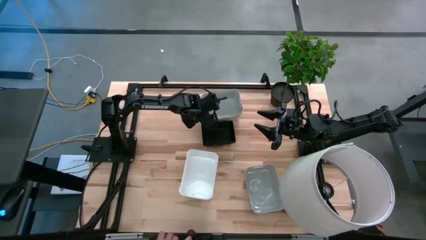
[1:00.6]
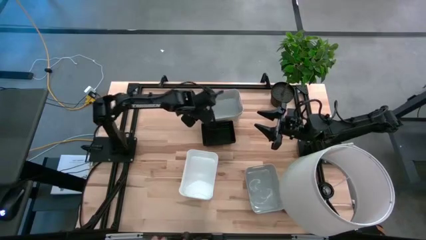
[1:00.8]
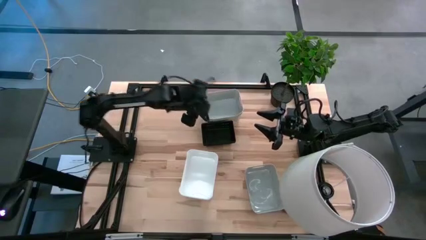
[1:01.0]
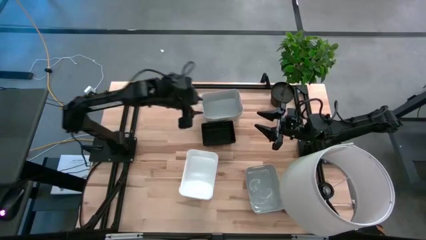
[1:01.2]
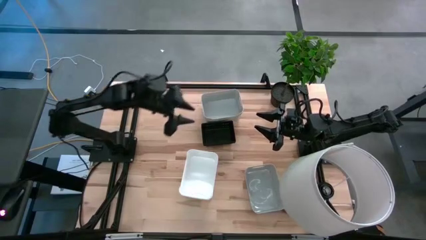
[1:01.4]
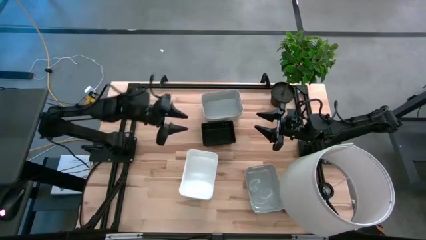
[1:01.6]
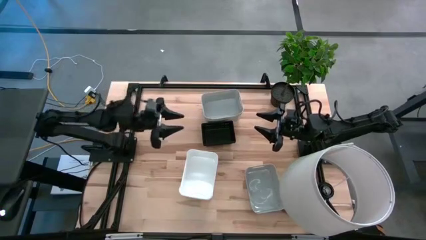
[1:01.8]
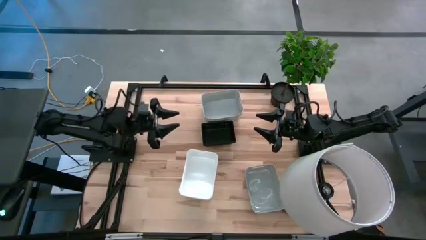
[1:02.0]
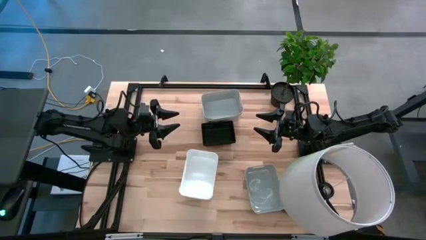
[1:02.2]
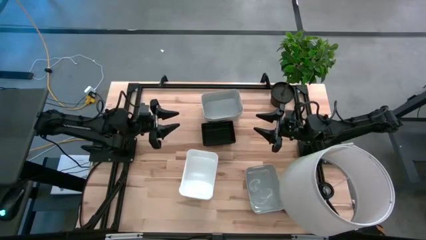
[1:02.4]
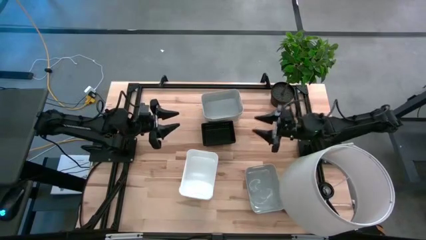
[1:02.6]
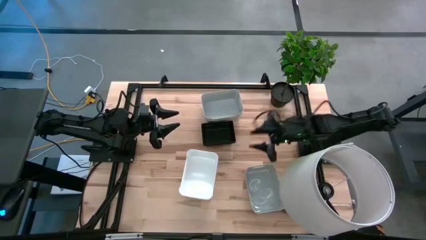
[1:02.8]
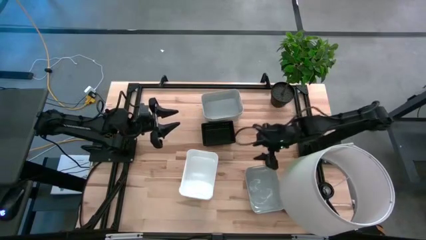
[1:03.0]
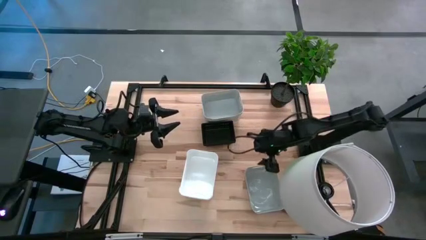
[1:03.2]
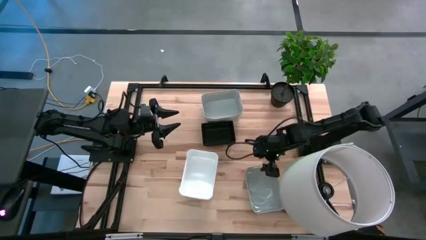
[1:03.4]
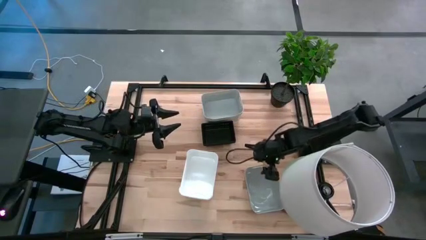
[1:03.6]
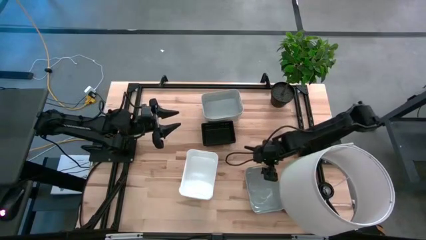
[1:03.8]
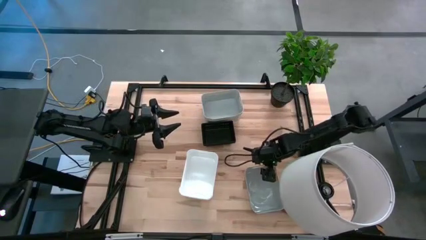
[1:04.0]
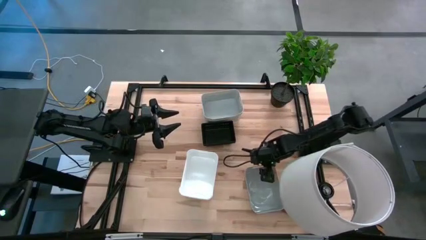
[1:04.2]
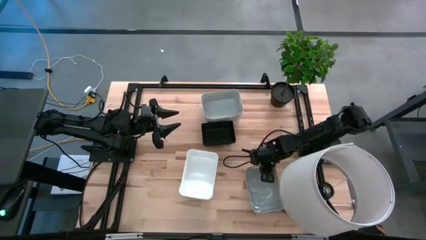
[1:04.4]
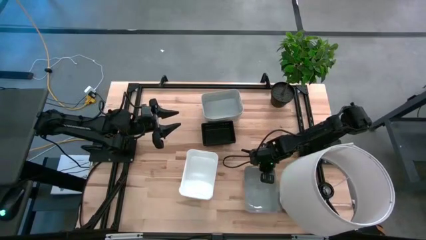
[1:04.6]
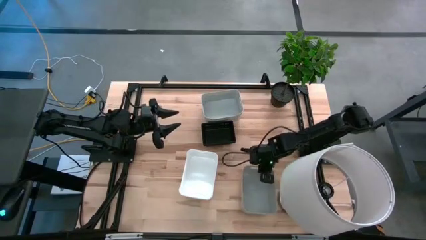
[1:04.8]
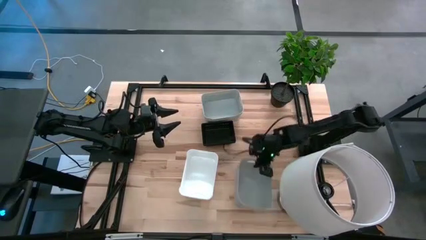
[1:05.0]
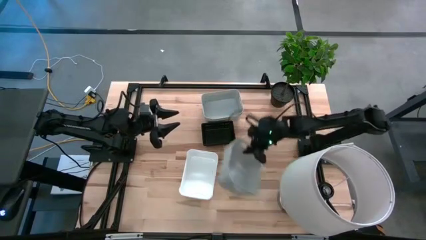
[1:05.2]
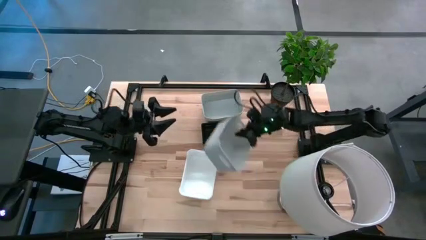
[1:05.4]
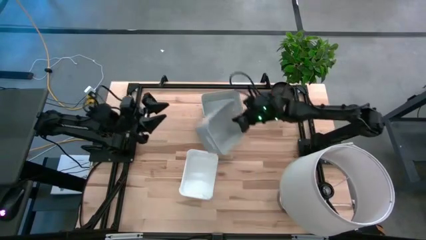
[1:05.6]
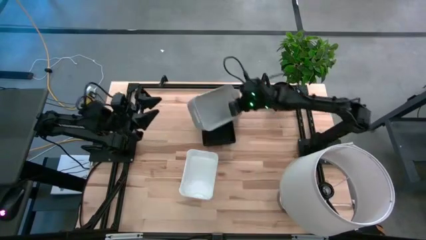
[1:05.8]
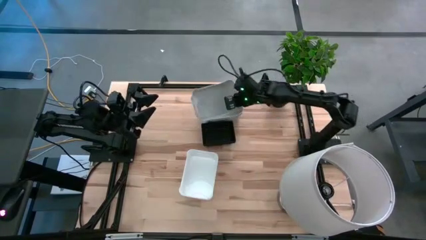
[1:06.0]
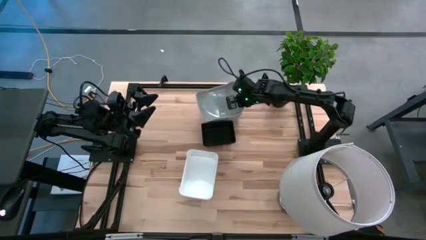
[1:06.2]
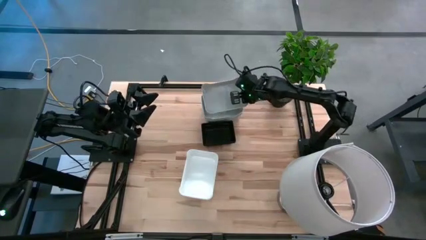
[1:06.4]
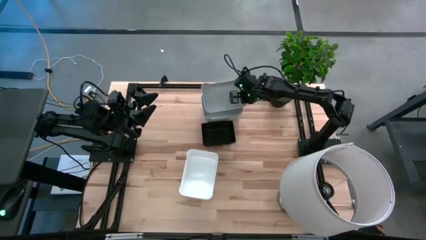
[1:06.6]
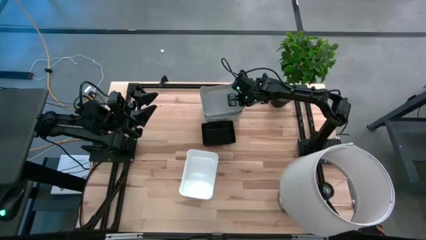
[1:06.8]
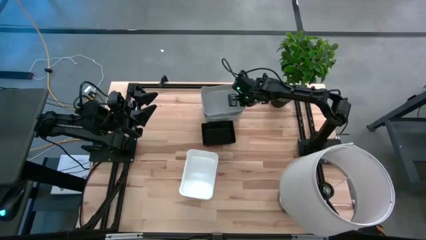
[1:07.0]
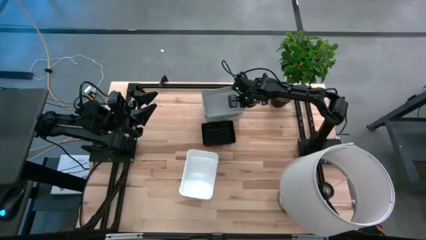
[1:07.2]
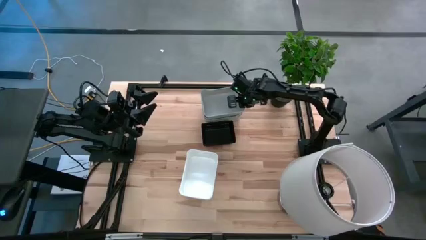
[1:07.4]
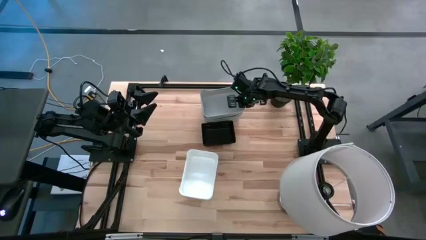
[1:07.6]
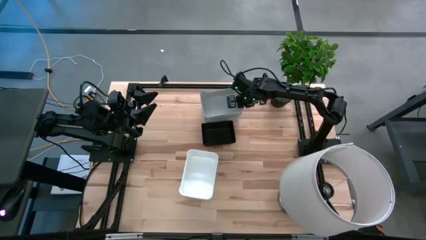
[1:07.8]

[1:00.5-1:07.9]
Stack the bottom gray bin on top of the gray bin

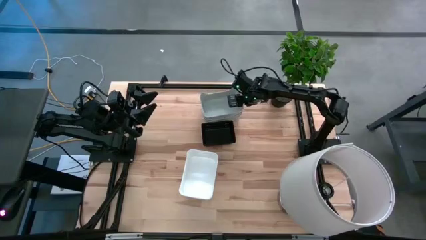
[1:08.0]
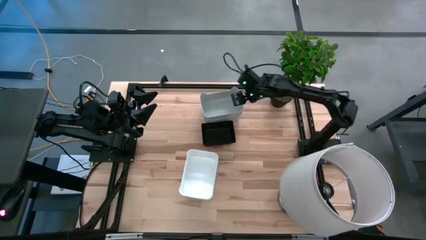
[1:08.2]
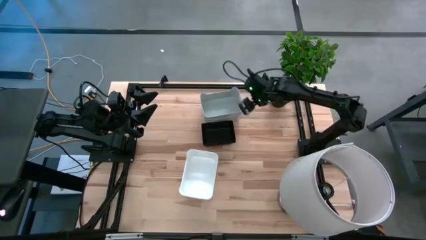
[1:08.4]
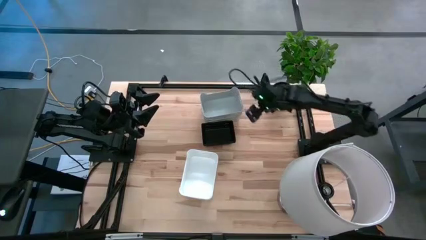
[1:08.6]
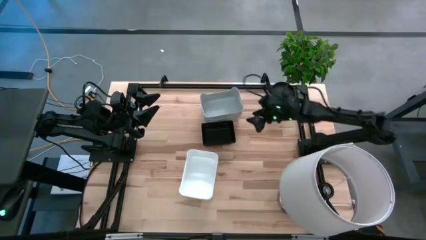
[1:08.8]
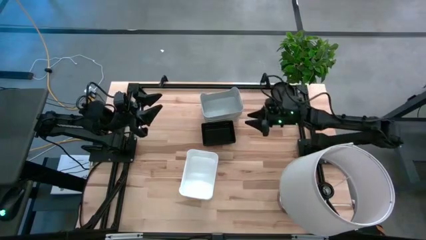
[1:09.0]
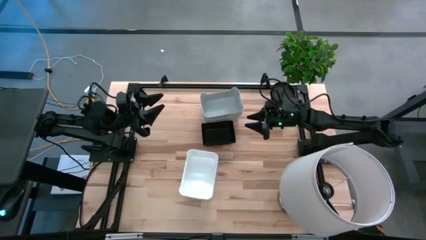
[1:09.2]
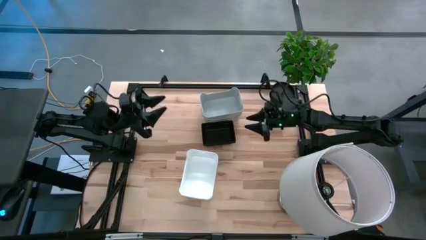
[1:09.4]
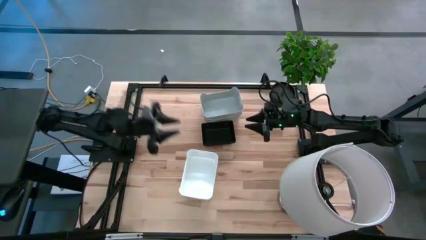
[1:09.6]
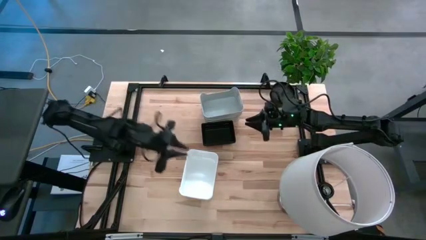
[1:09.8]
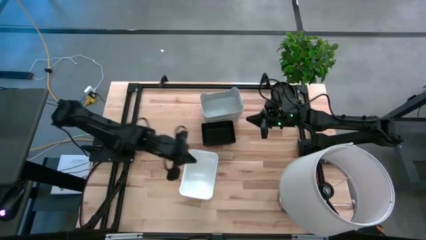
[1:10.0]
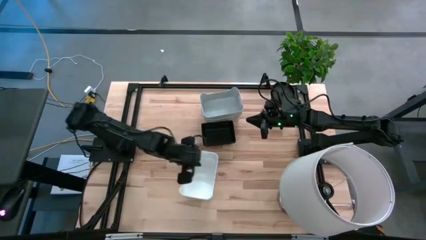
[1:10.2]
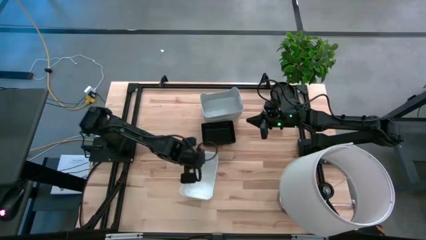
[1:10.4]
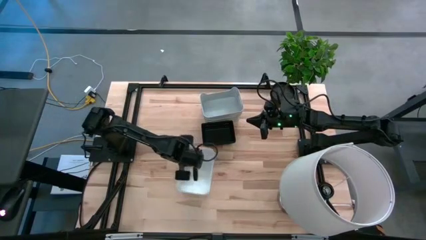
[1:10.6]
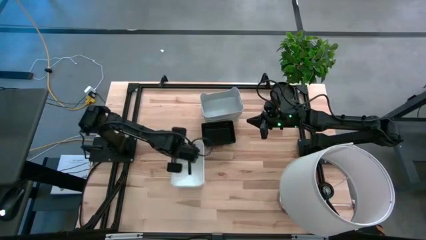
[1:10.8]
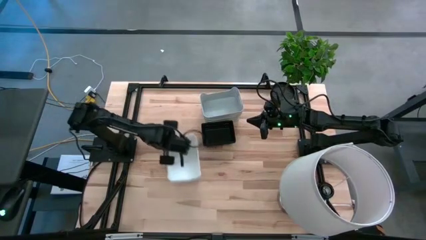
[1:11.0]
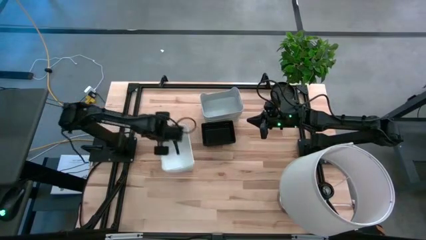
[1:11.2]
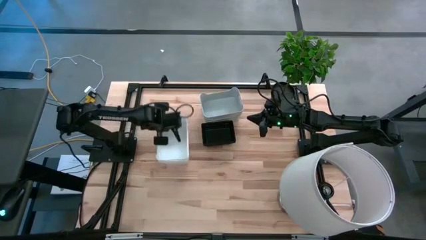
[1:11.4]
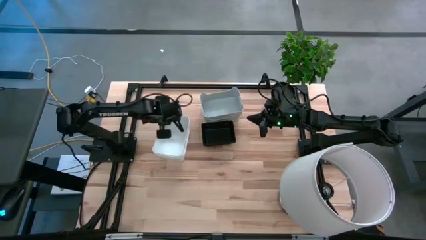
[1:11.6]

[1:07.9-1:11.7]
Move the stacked white bins to the middle left of the table

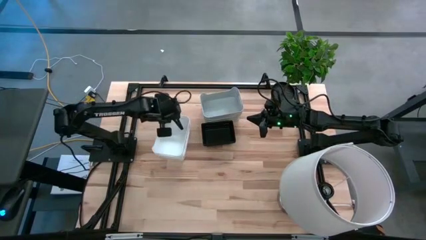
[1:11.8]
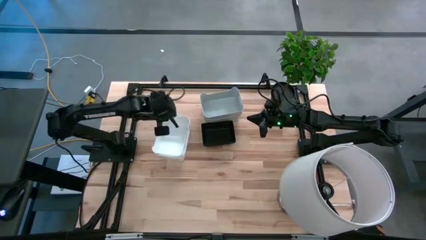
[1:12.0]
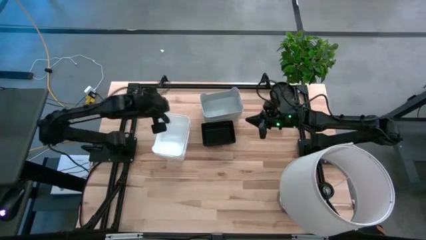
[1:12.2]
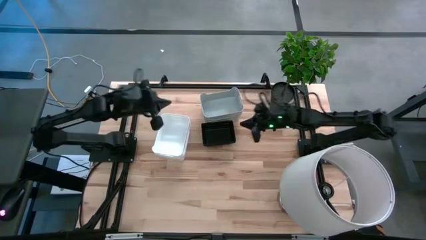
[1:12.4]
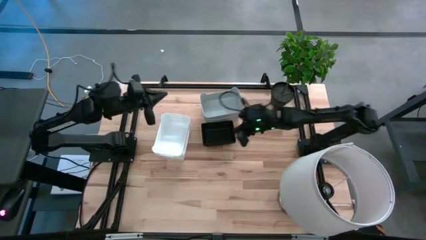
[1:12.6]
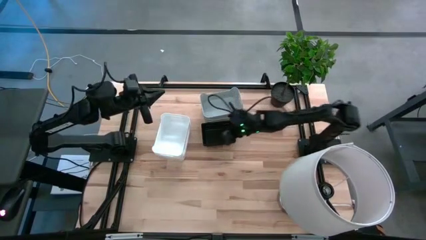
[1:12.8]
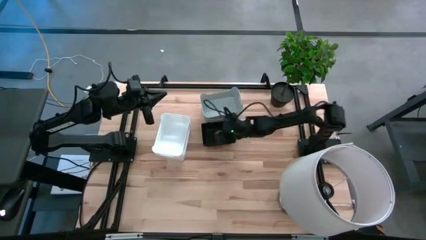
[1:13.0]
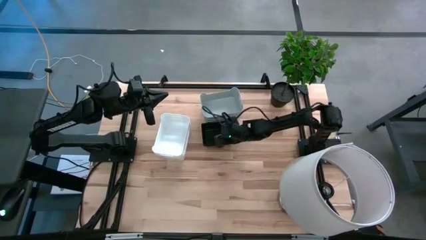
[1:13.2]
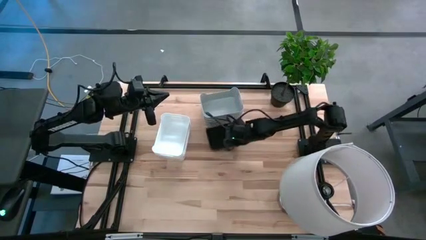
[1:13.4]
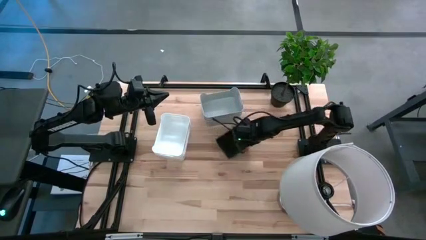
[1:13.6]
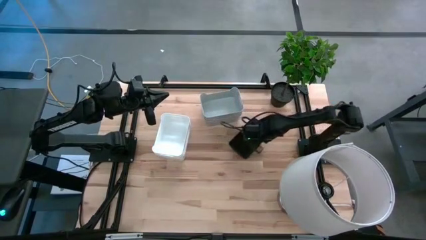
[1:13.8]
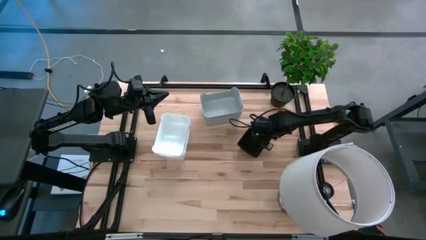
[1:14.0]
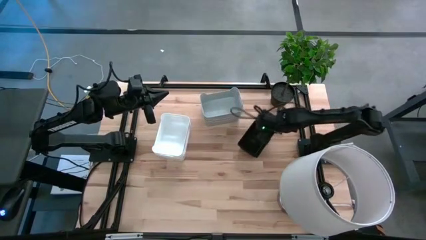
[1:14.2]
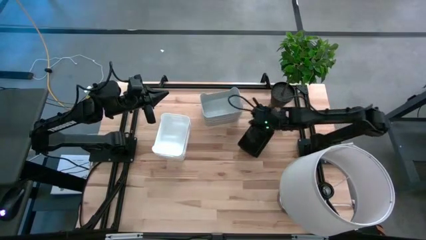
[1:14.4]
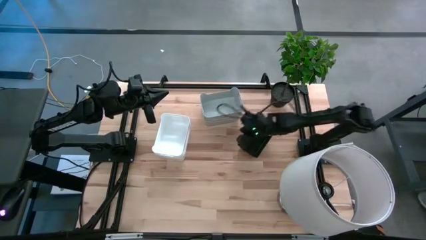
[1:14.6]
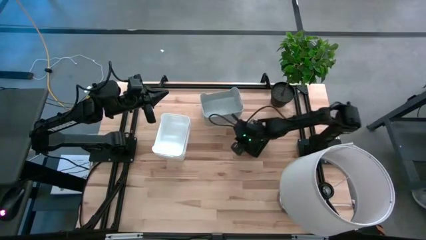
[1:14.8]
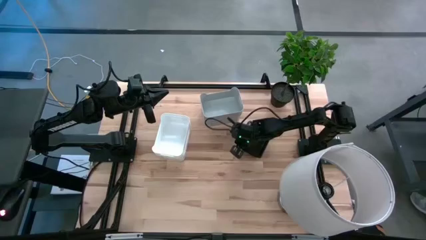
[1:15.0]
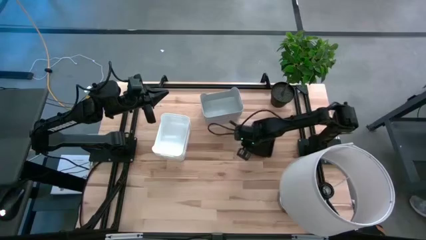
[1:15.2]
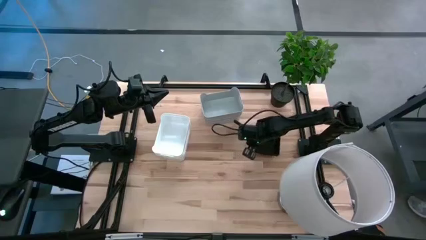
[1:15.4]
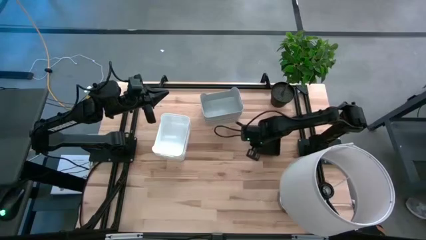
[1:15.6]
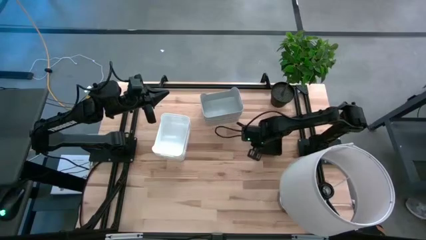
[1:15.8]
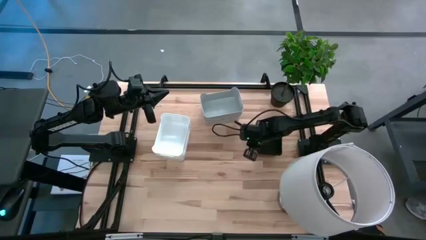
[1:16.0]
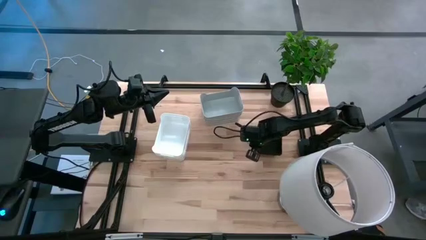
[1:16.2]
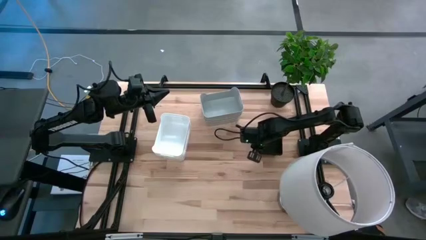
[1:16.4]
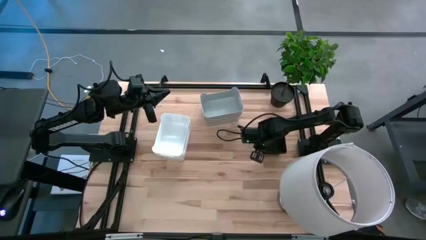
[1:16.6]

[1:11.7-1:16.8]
Move the stacked black bins to the middle right of the table

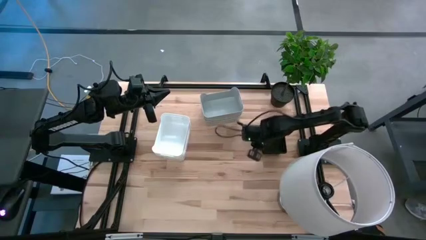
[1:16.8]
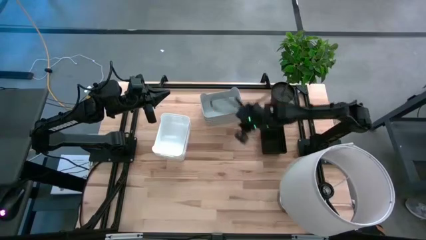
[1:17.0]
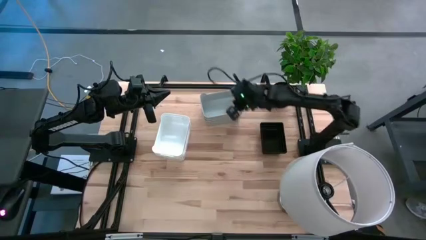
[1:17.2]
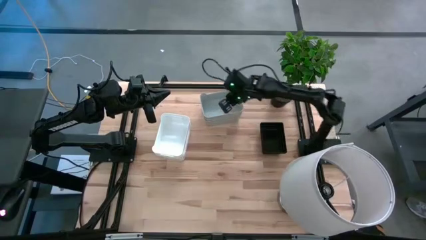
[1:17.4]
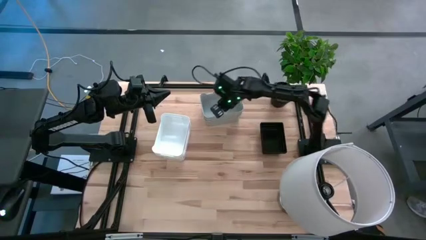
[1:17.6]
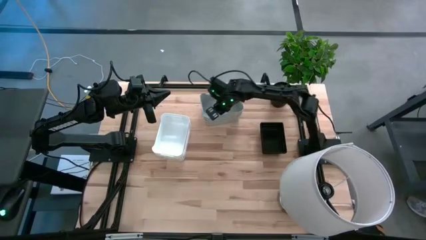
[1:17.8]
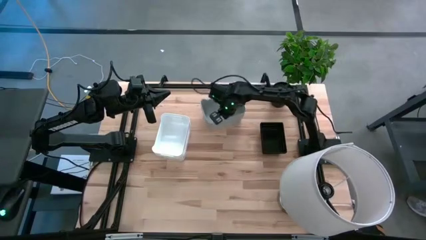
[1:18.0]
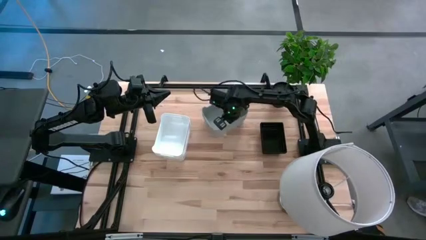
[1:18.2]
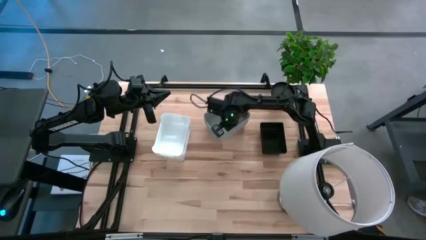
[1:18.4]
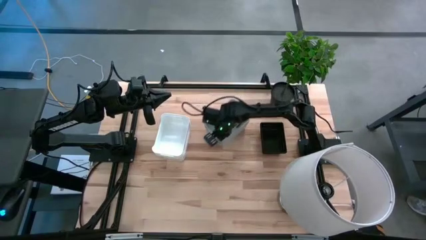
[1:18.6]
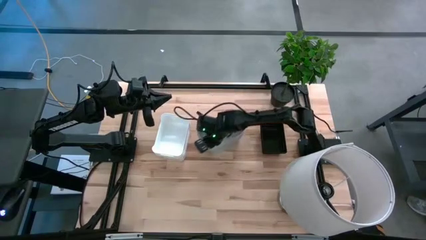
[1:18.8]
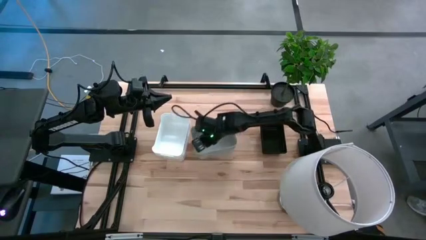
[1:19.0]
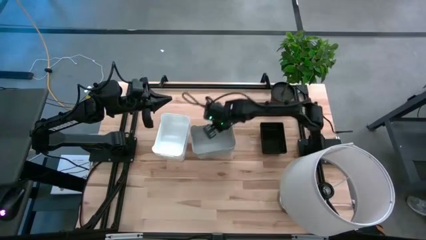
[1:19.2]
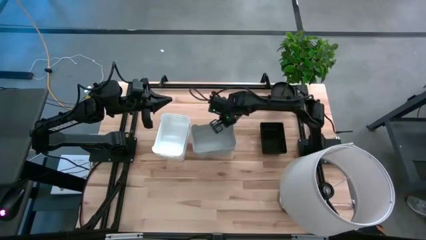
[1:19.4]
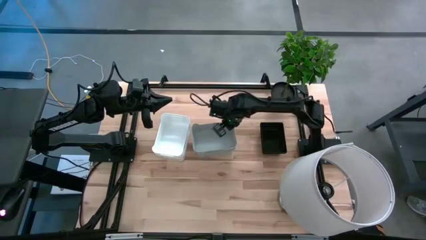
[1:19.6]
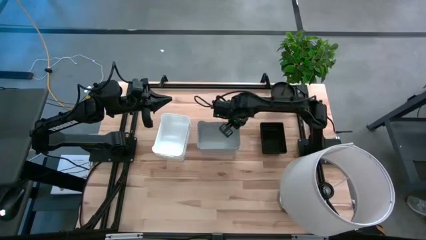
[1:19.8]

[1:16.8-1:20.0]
Move the stacked gray bins to the center of the table
